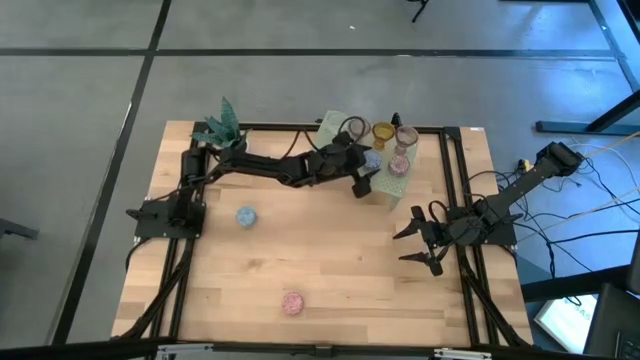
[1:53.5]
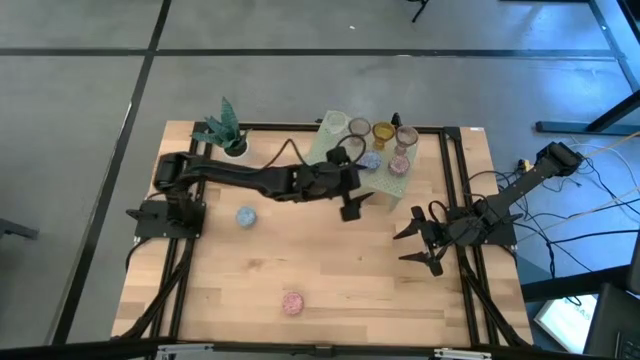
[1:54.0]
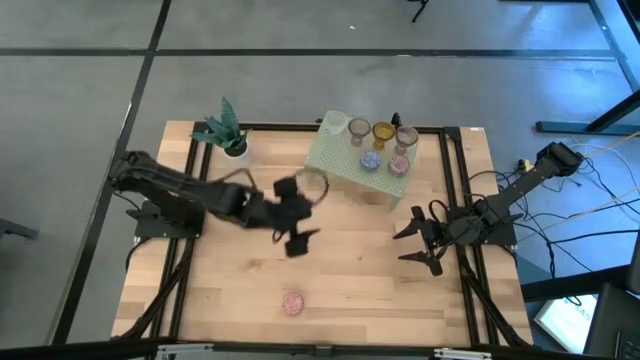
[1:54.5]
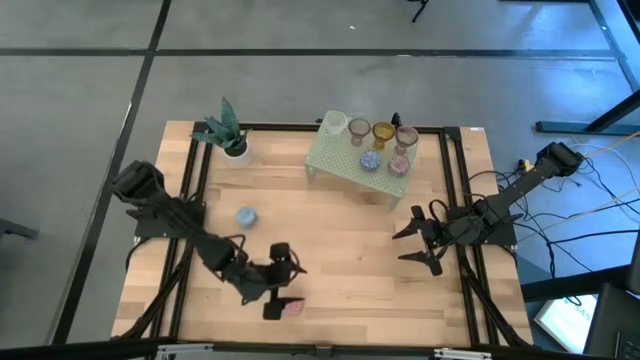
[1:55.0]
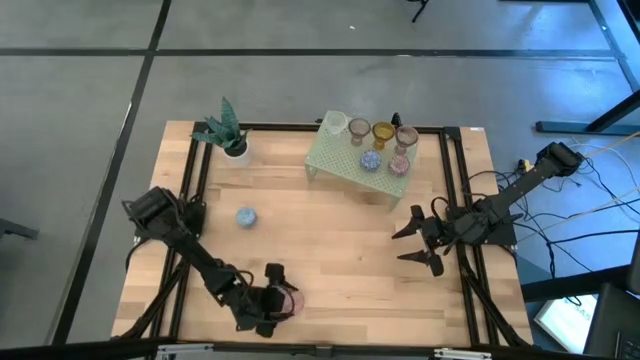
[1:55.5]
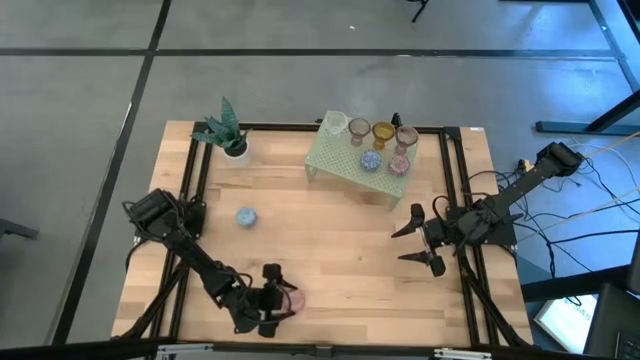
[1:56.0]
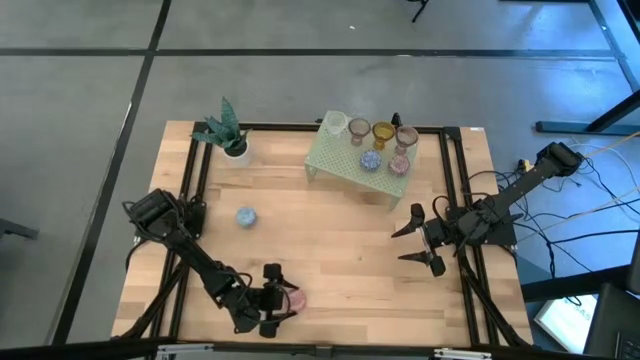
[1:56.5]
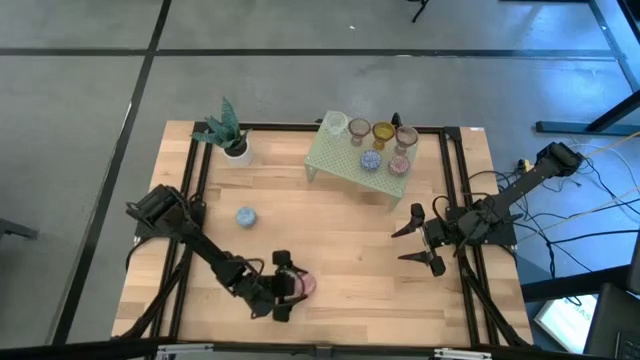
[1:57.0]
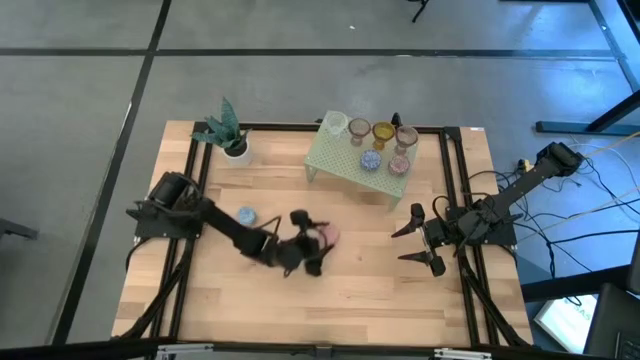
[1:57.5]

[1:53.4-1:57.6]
Task: Pick & Place candle stick holders
Put the pink scented candle on the shelf aligned with the blue scented candle

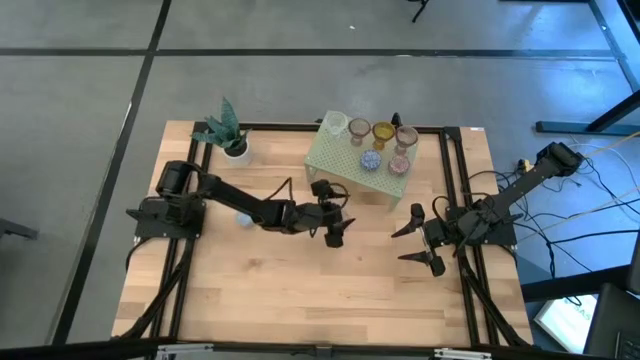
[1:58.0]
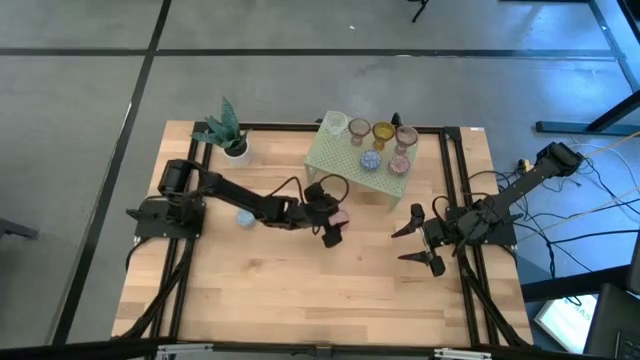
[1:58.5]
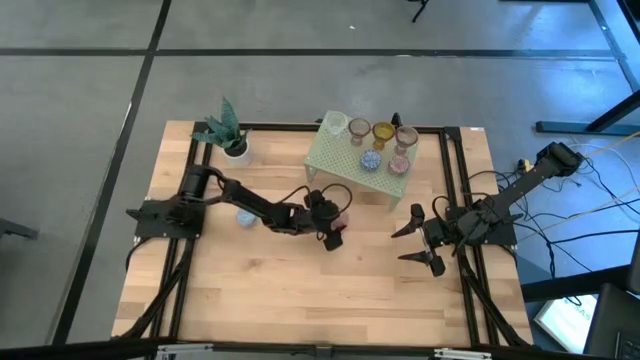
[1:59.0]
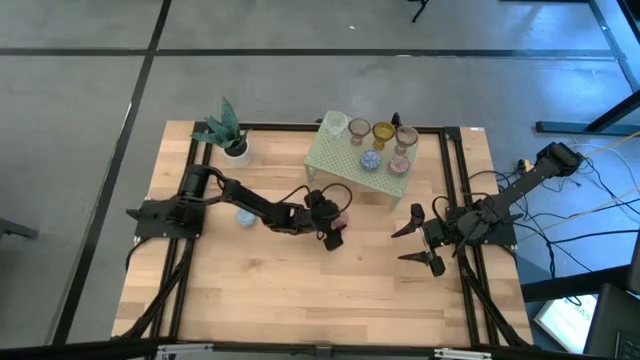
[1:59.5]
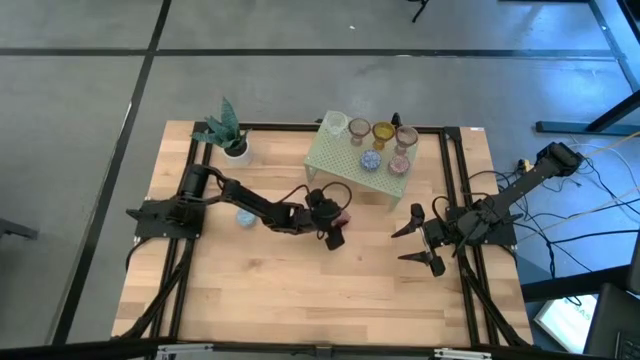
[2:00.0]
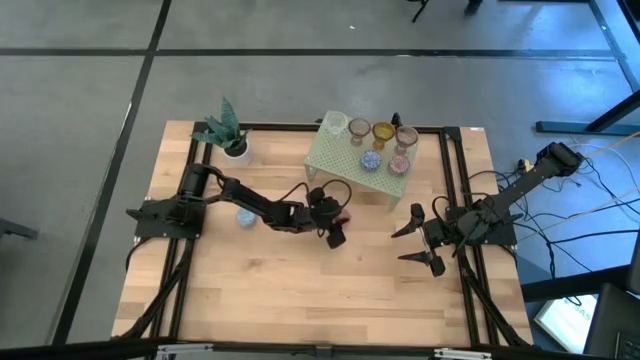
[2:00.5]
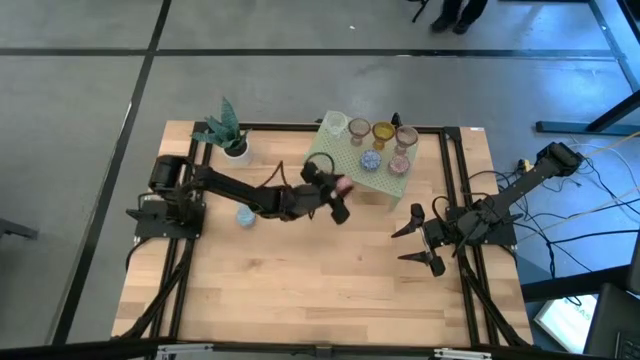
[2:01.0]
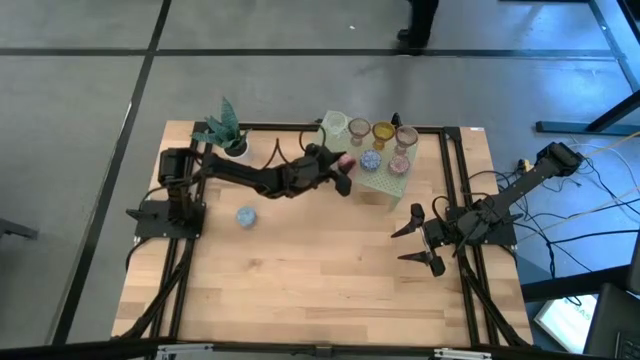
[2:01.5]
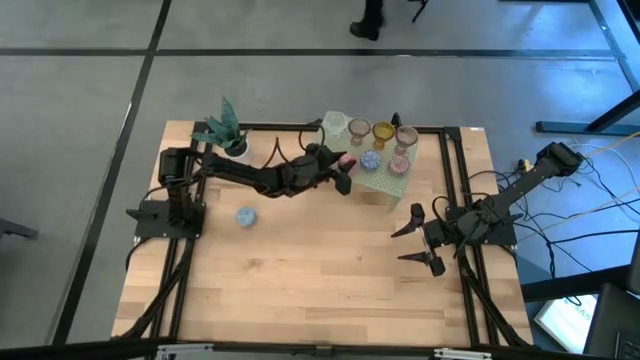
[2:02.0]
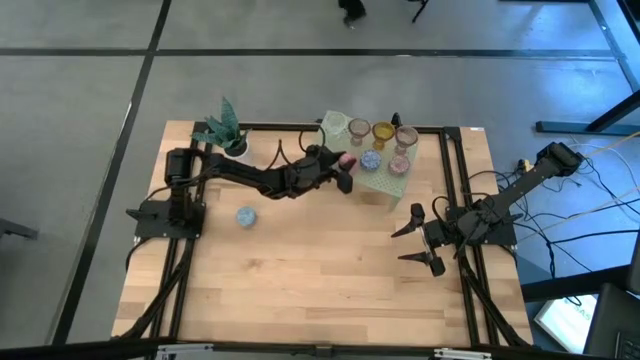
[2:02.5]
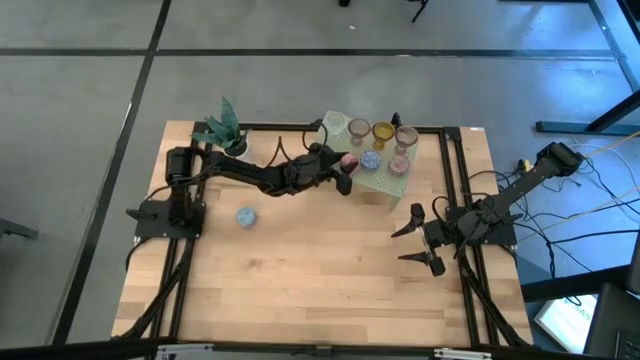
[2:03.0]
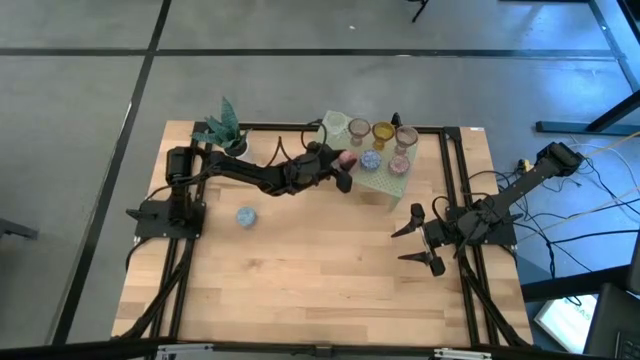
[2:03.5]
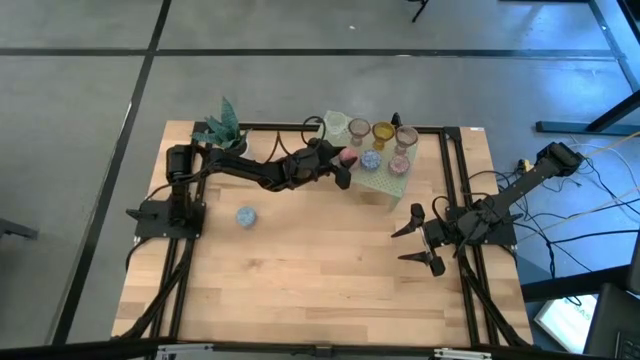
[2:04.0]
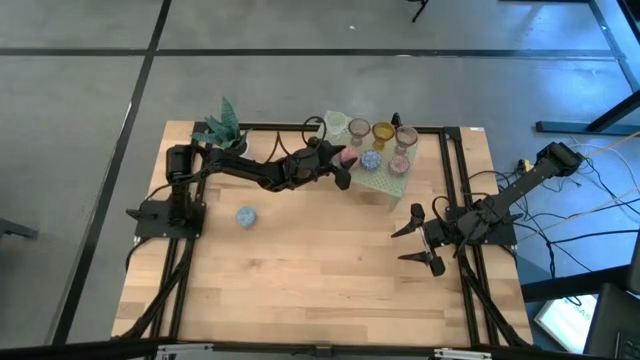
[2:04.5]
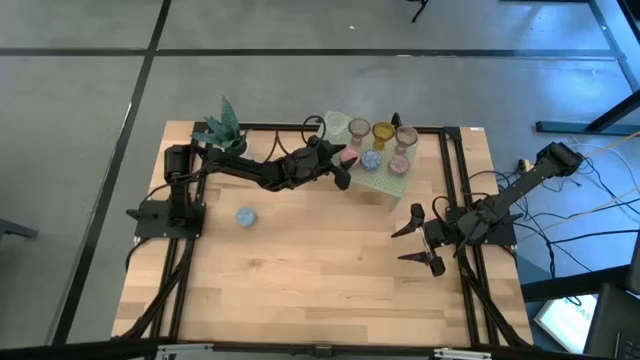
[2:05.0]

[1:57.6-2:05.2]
Put the pink scented candle on the shelf aligned with the blue scented candle

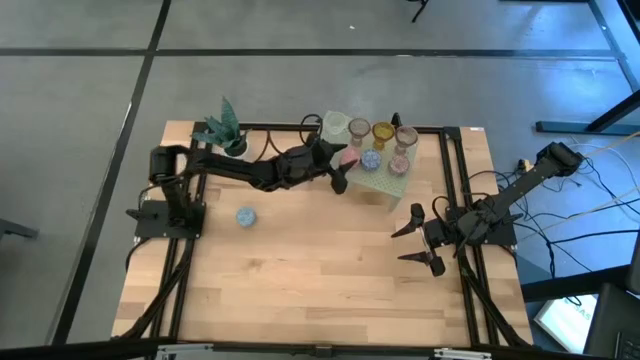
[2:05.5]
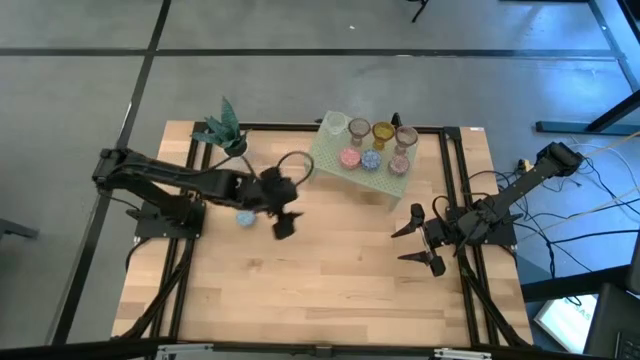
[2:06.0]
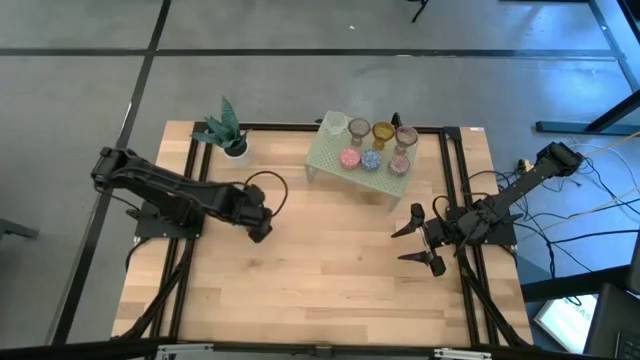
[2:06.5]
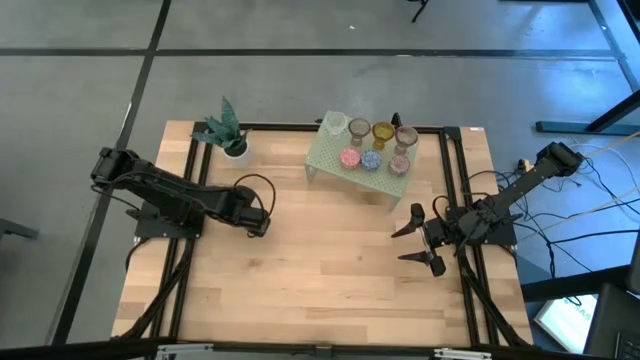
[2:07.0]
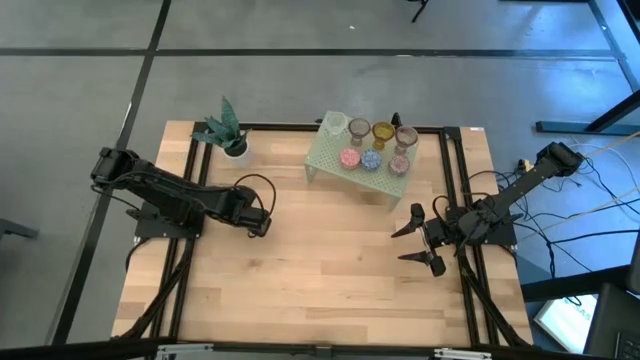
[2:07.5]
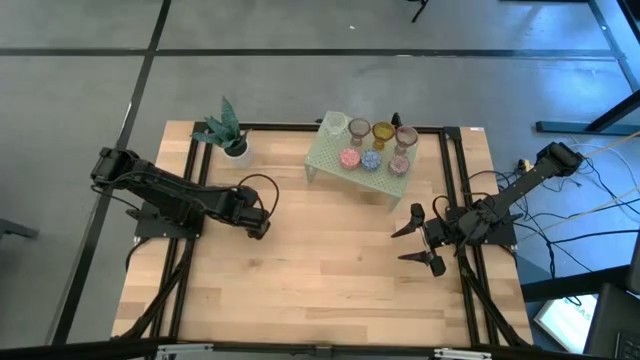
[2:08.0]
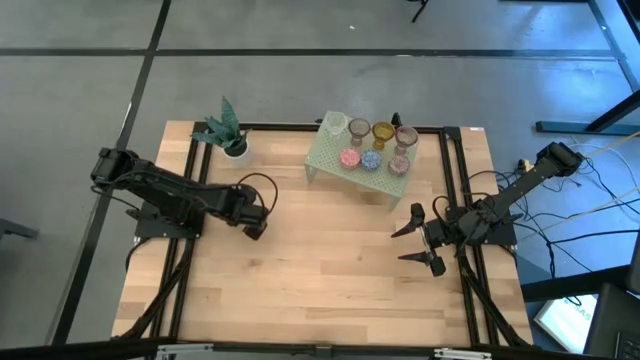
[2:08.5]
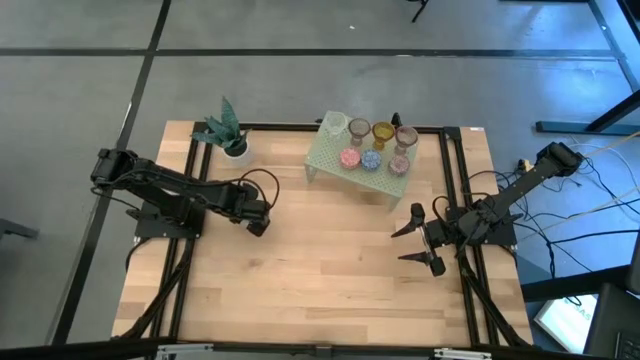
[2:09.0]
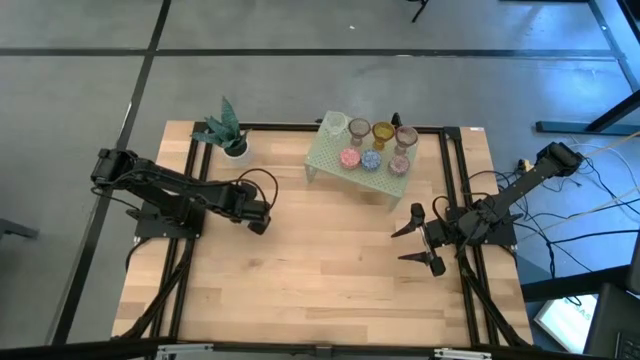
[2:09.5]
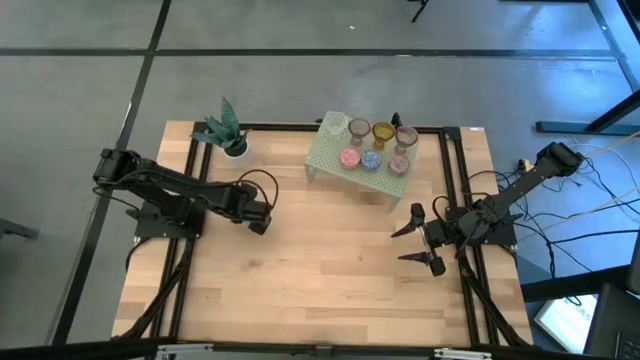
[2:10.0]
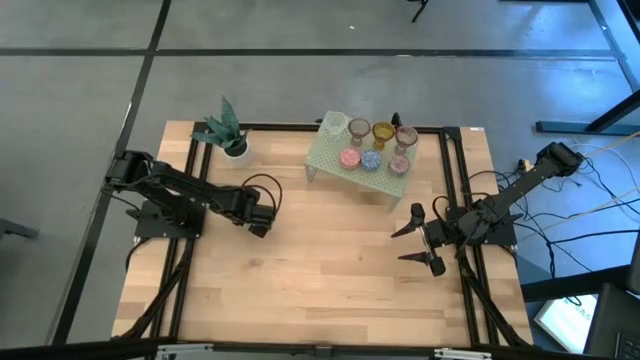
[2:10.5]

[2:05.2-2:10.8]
Put the blue scented candle on the shelf aligned with the pink scented candle

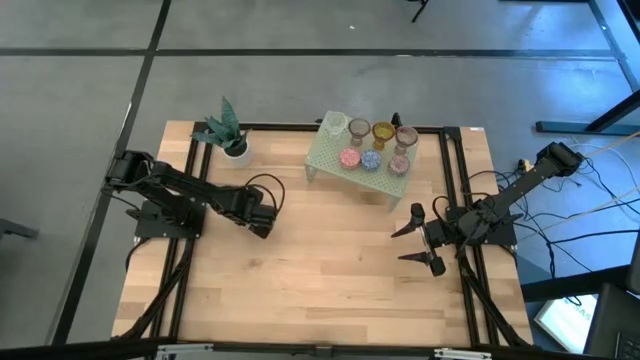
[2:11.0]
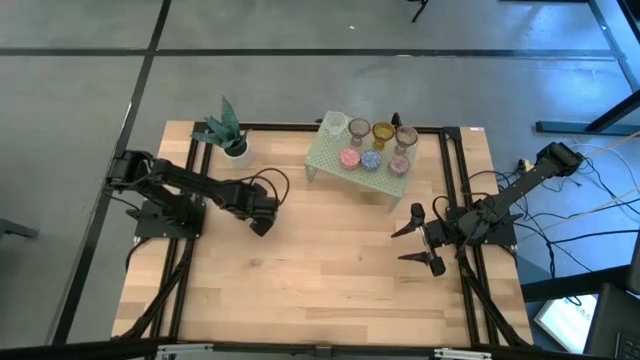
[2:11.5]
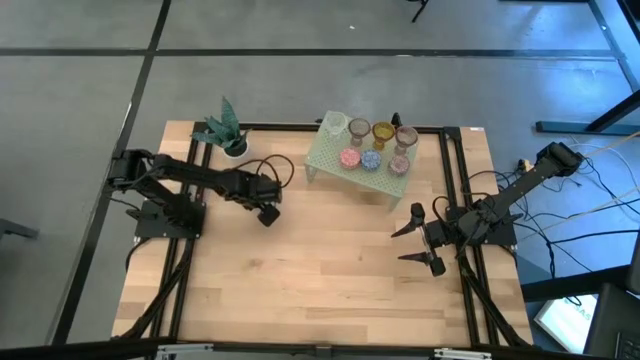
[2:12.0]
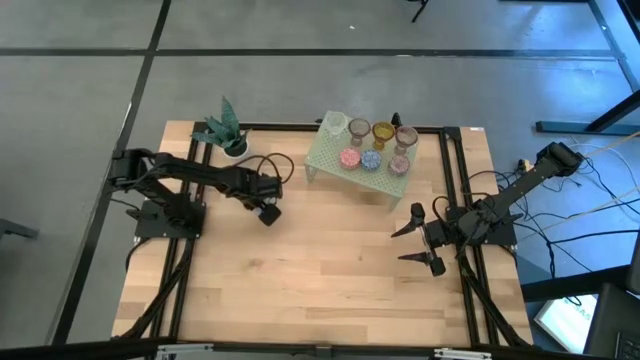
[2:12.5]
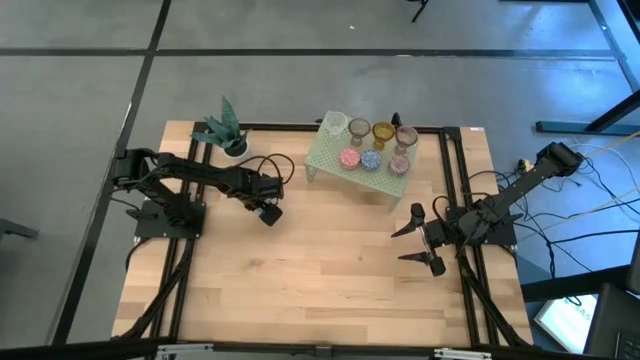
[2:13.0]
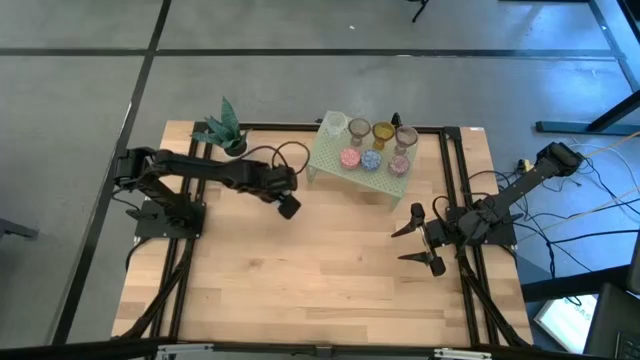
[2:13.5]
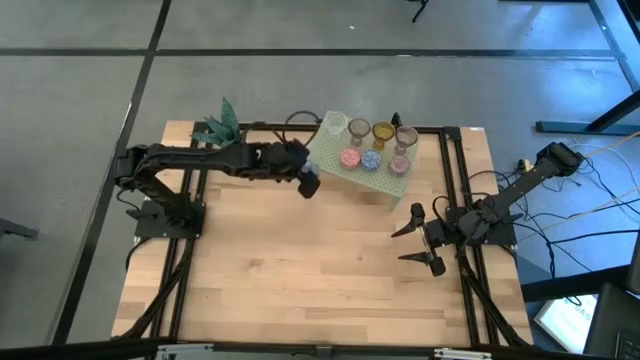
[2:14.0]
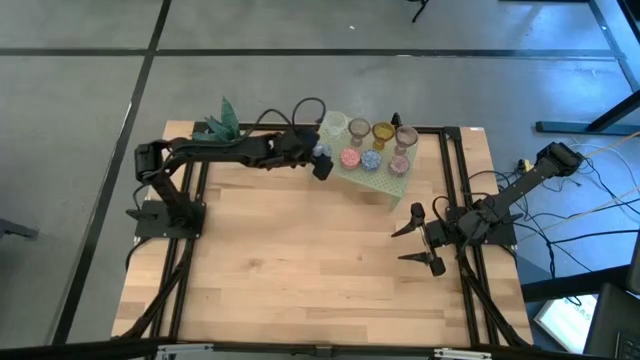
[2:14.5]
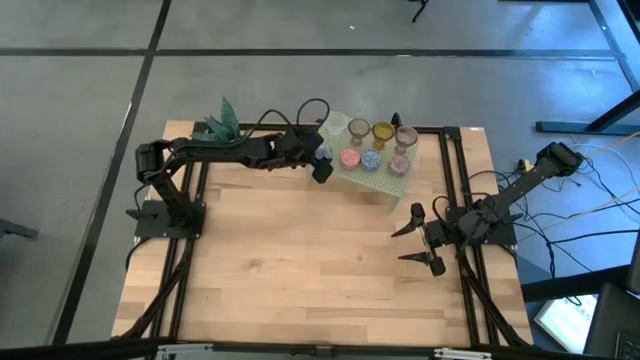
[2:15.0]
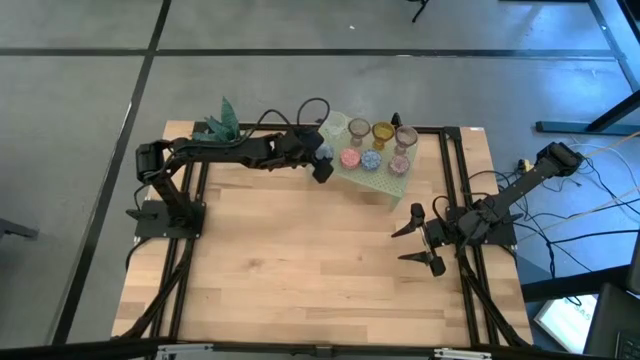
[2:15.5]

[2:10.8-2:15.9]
Put the blue scented candle on the shelf aligned with the pink scented candle
